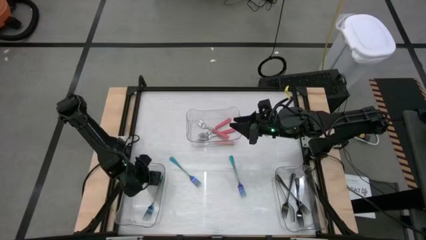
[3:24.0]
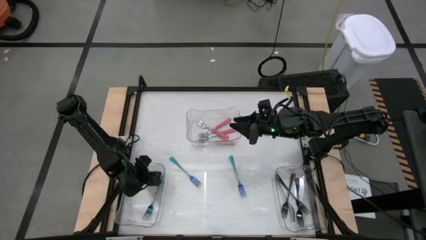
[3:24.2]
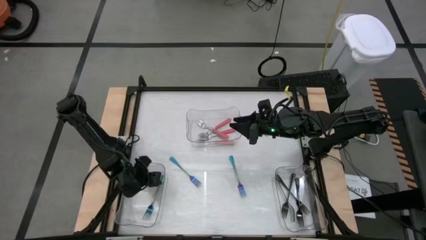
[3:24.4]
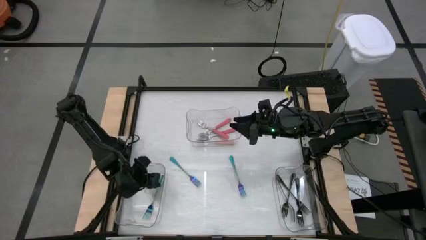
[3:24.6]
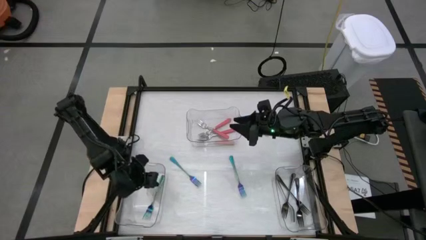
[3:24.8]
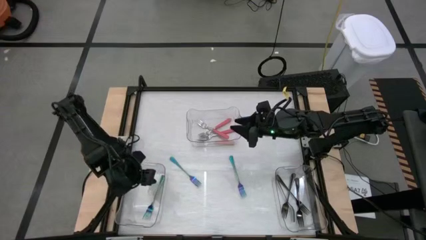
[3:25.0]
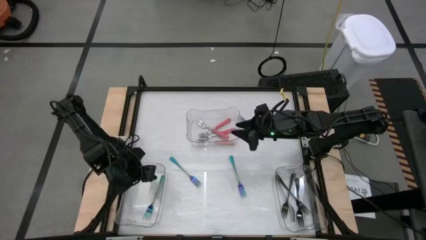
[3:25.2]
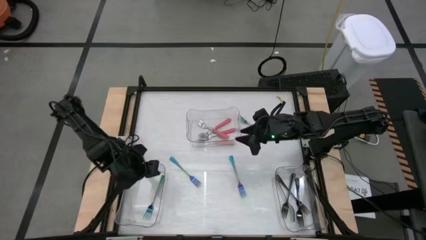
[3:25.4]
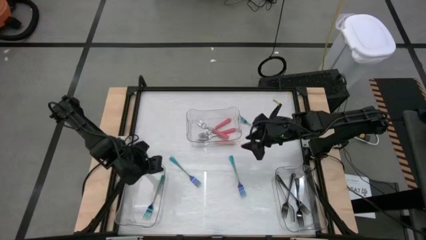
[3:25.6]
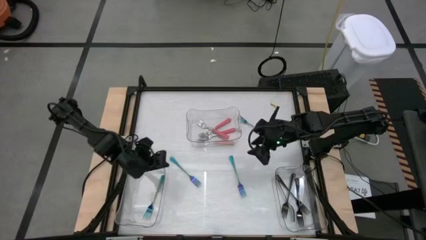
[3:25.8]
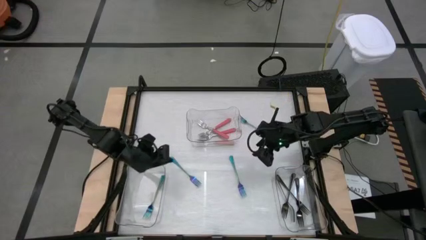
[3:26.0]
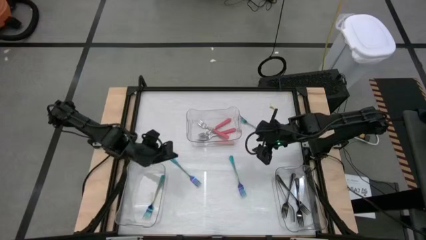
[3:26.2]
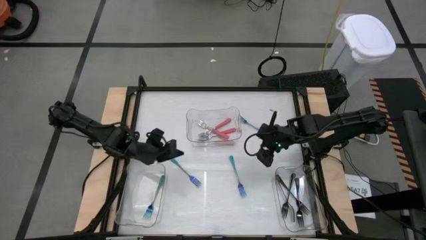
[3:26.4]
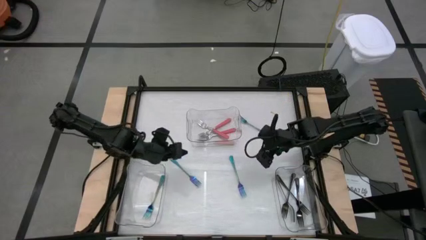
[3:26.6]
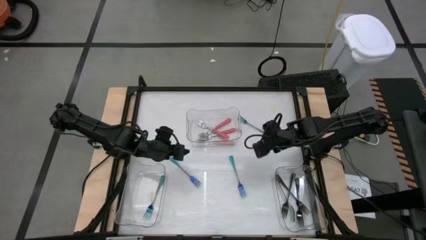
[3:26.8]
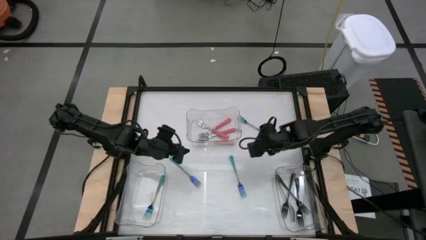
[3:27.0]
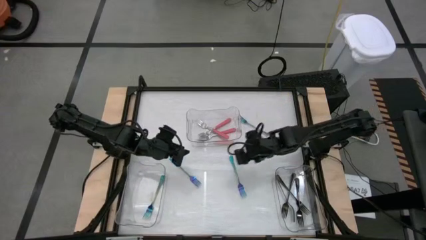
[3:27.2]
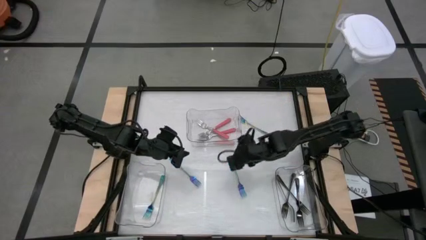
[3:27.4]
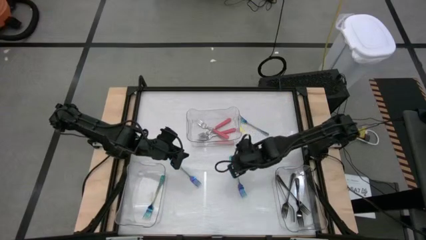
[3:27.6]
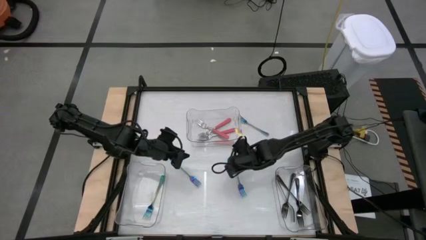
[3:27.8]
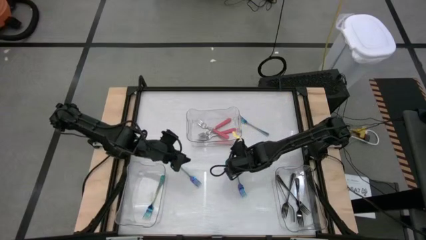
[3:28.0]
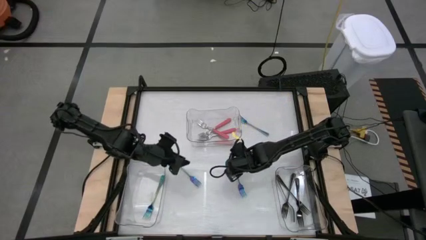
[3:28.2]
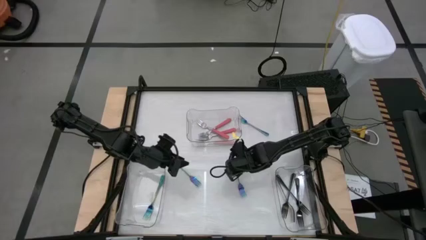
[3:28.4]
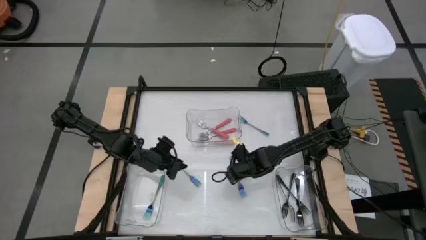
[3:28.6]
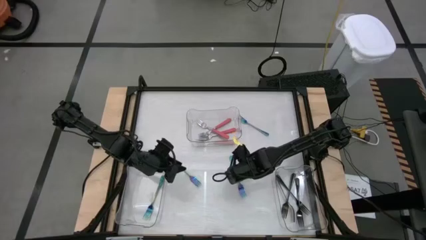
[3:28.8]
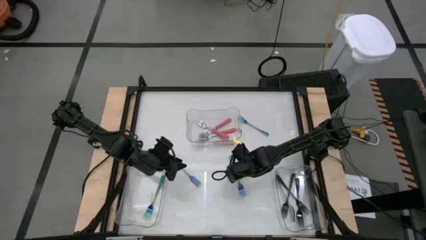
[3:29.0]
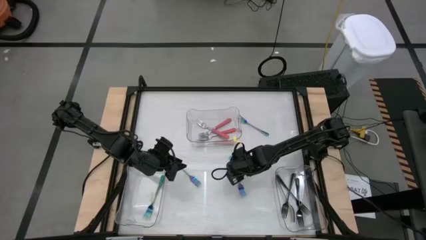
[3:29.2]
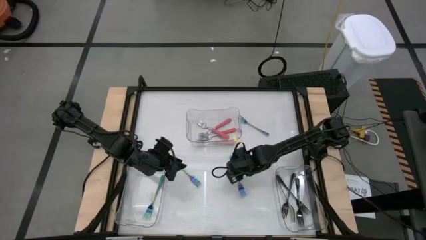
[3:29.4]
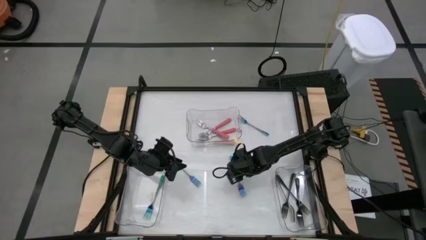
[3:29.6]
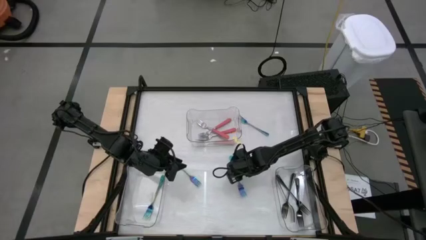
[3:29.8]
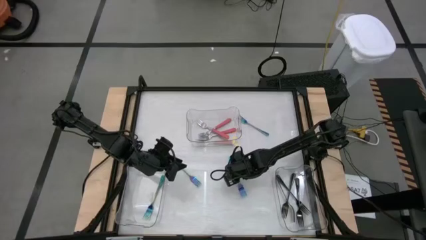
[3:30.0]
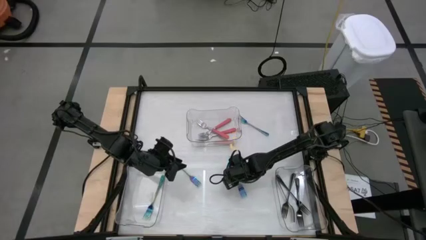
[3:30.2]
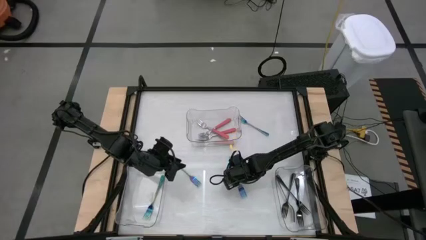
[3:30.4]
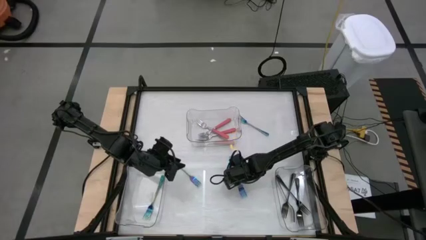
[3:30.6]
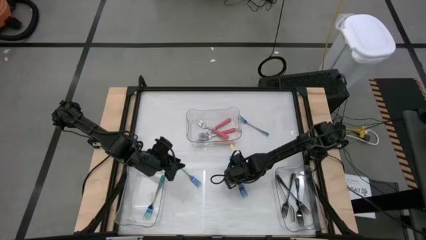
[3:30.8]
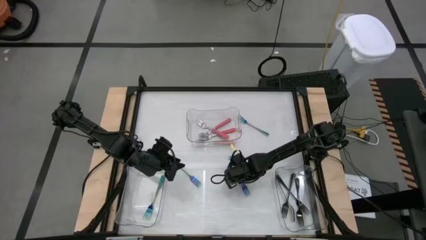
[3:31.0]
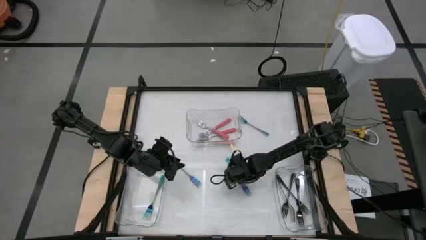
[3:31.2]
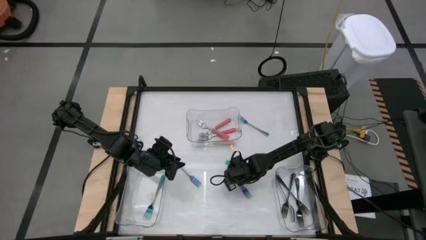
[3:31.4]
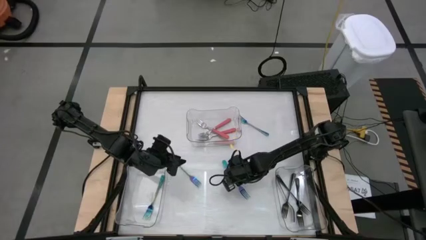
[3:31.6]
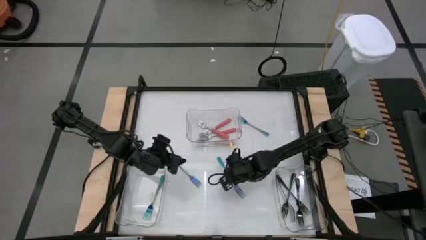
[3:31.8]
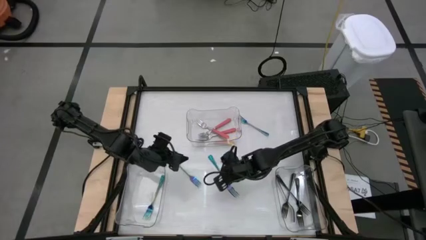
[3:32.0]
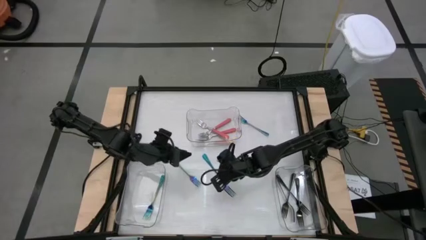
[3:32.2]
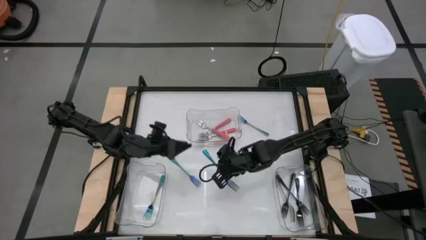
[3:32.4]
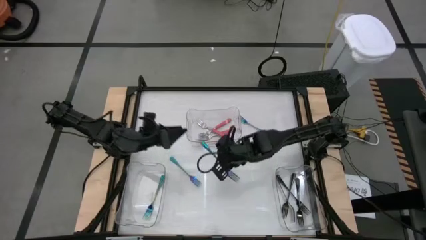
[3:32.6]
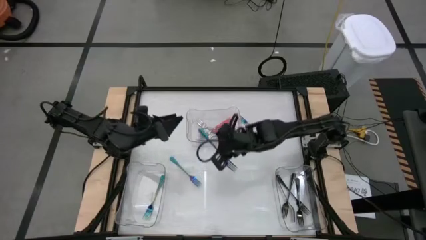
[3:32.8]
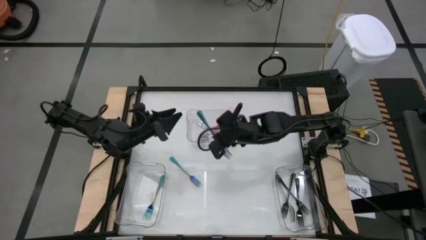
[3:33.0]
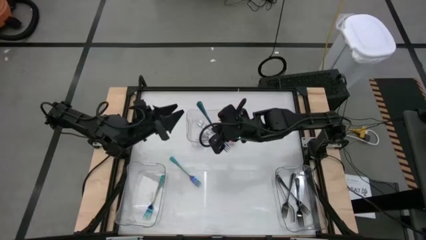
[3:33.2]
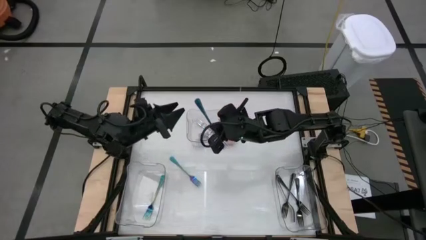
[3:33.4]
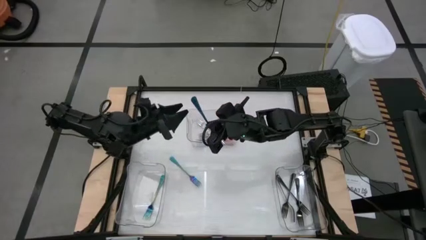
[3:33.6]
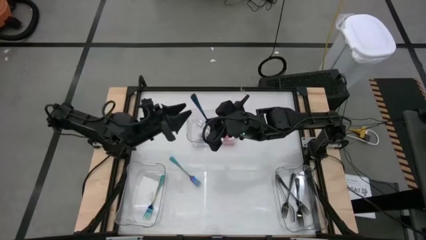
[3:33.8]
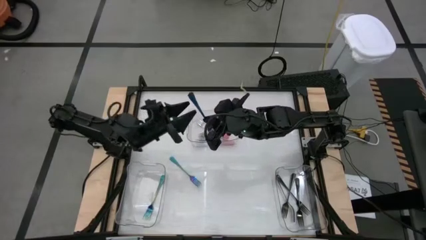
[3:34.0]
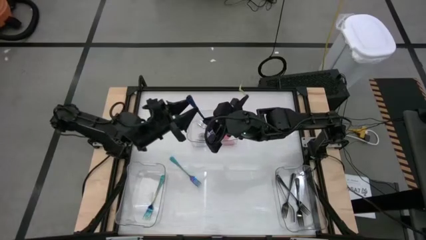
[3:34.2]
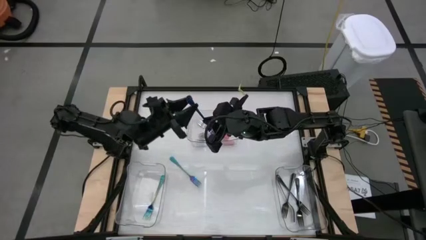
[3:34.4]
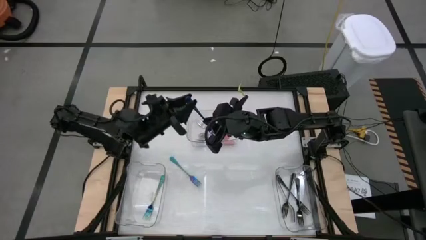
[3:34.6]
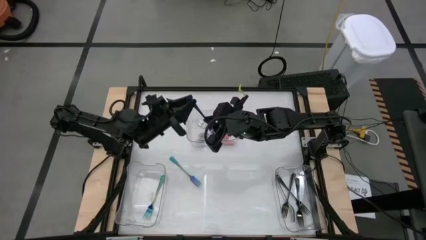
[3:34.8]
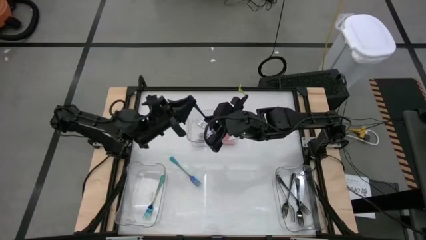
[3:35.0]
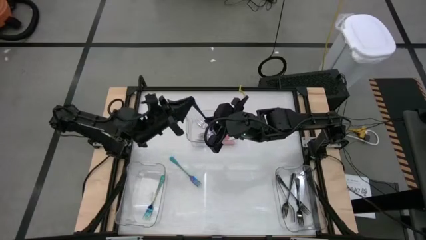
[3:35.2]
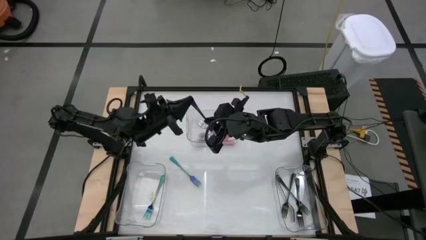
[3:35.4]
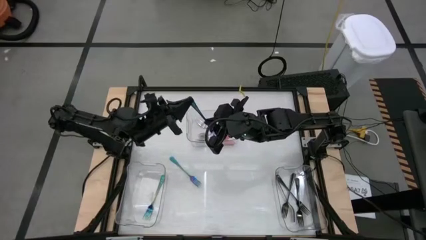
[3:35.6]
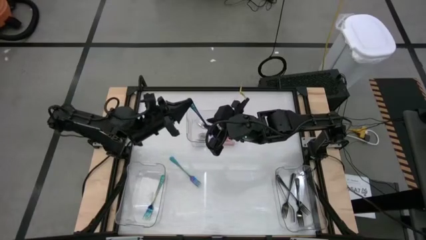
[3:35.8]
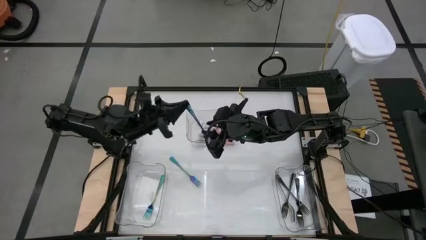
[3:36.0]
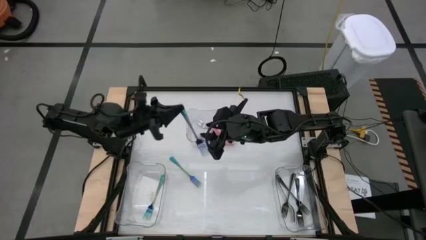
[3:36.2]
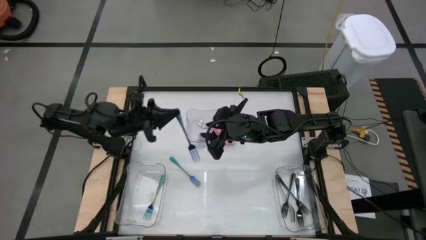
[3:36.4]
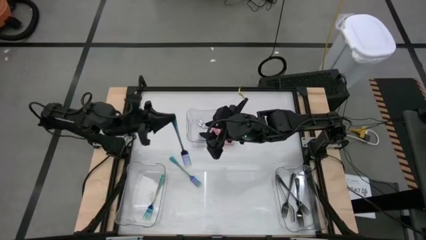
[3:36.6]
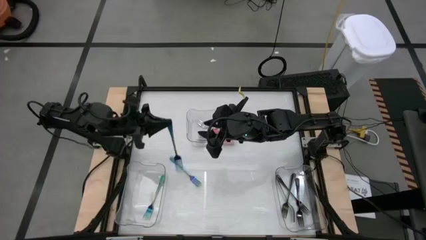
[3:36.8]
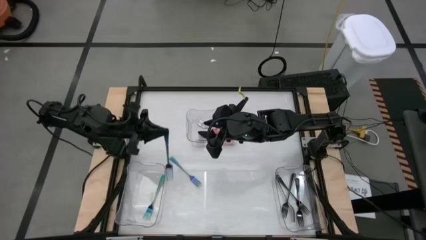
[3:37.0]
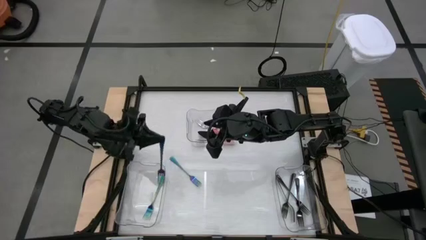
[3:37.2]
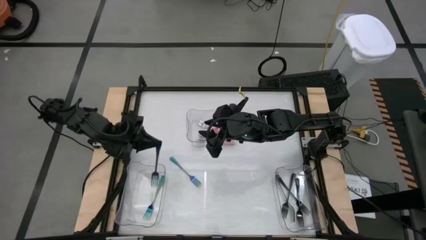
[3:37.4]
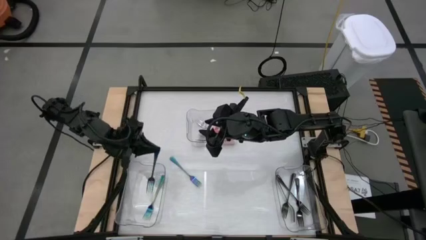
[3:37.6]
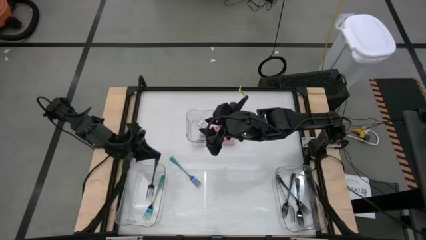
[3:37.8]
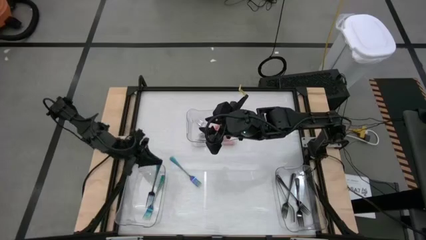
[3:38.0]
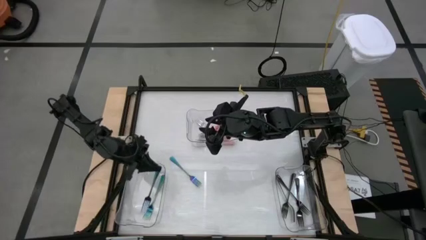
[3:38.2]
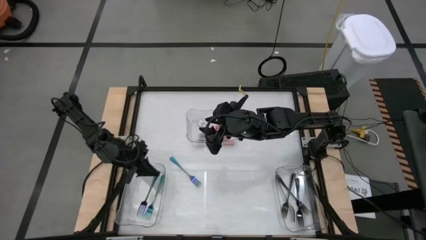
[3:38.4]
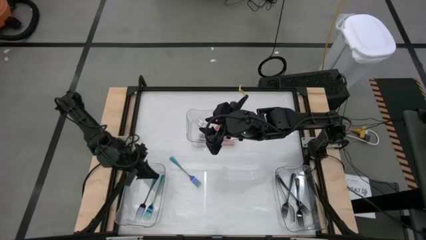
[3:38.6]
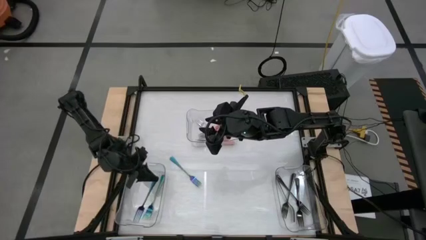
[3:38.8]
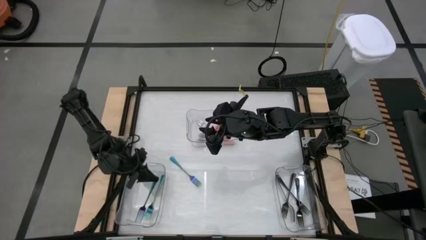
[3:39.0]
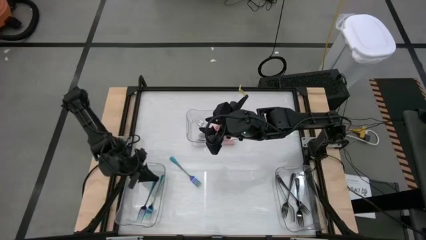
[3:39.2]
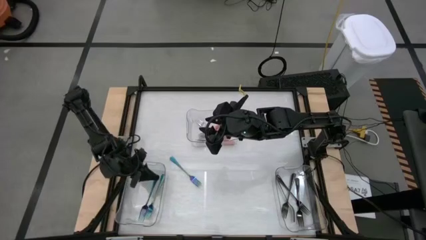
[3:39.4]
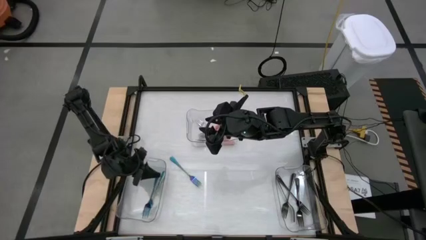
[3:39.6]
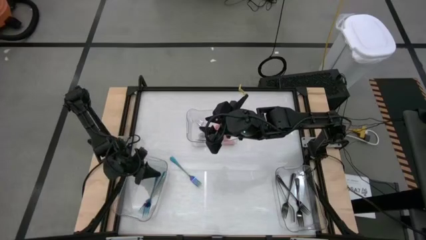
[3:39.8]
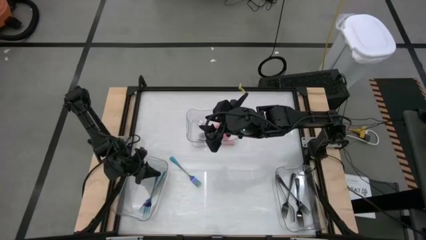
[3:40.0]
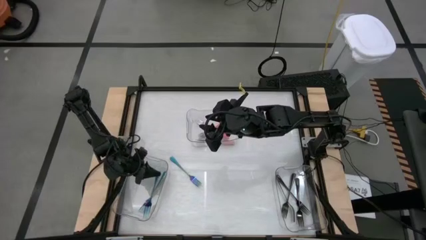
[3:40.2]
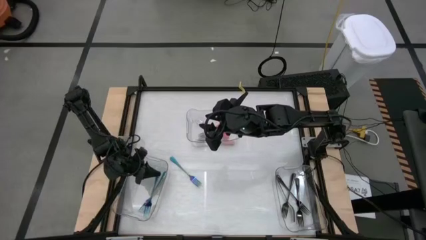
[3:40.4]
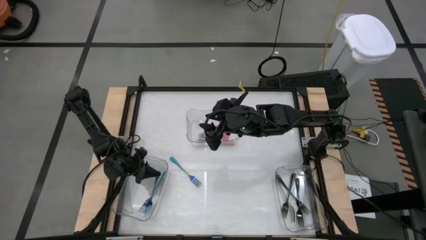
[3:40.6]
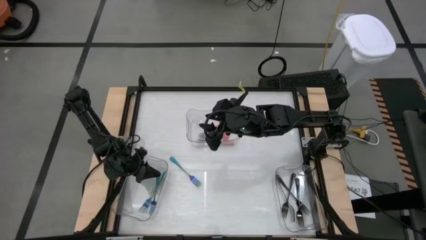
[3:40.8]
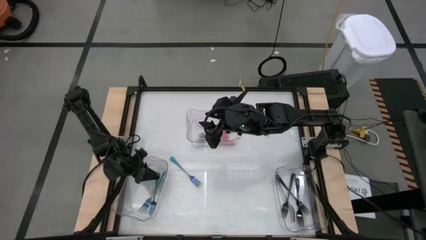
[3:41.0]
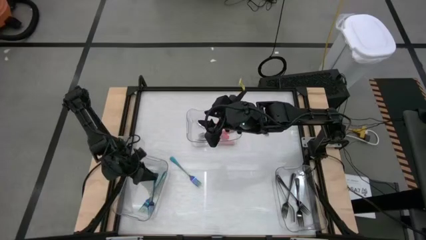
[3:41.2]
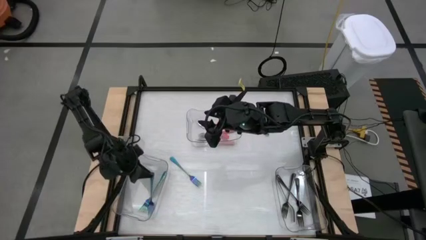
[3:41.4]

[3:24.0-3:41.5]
Task: Sort silverware by color (type)
Put the blue fork into the left transparent bin
